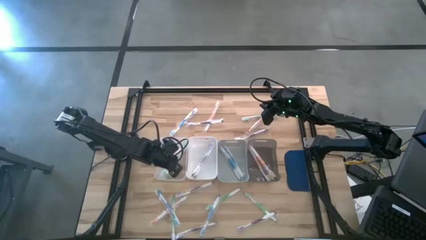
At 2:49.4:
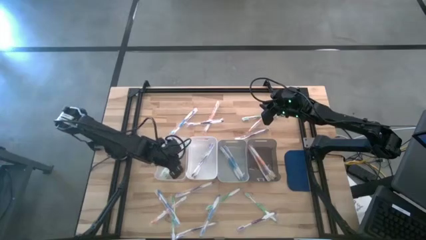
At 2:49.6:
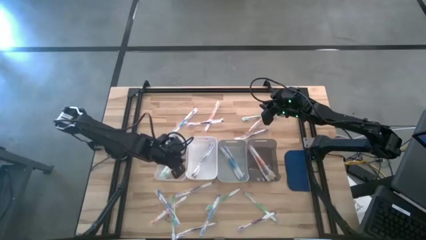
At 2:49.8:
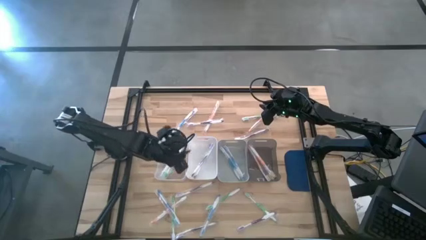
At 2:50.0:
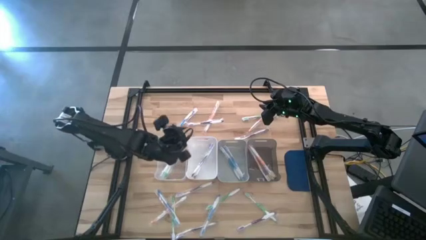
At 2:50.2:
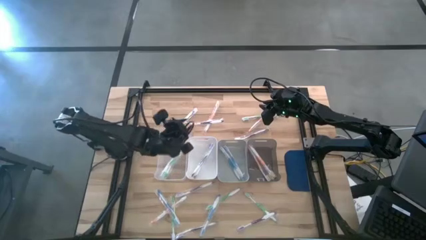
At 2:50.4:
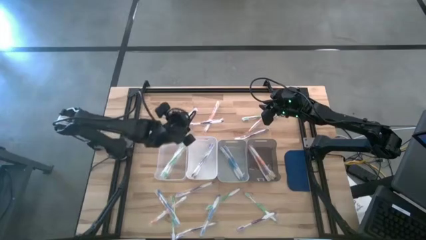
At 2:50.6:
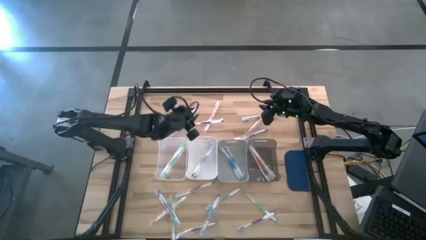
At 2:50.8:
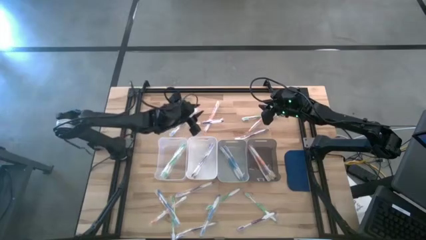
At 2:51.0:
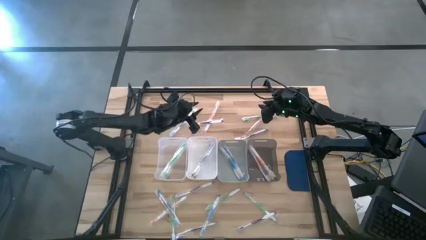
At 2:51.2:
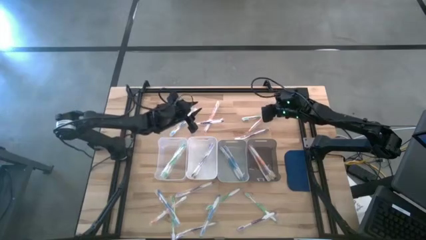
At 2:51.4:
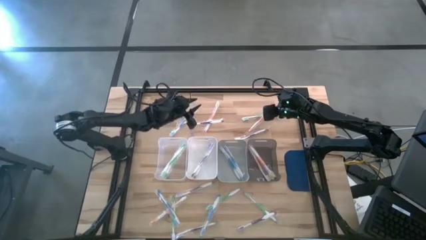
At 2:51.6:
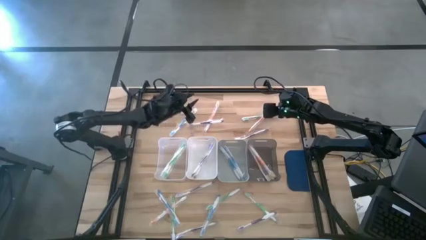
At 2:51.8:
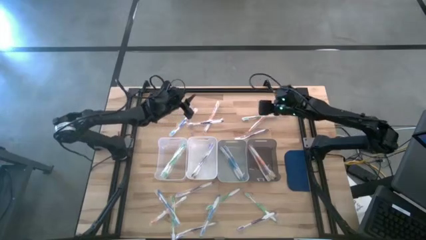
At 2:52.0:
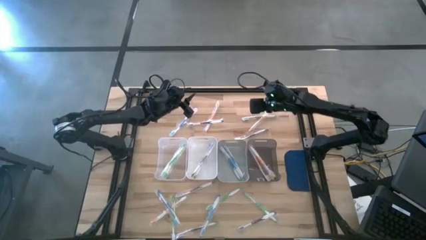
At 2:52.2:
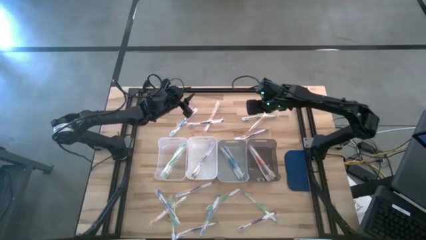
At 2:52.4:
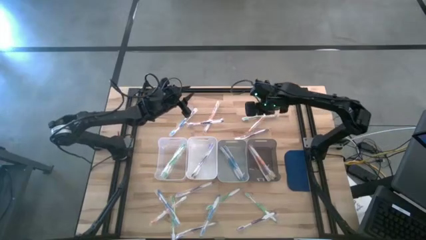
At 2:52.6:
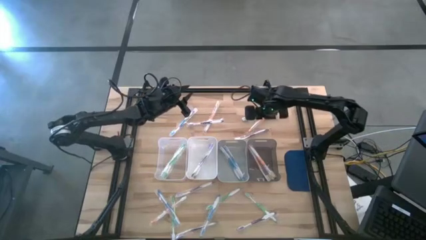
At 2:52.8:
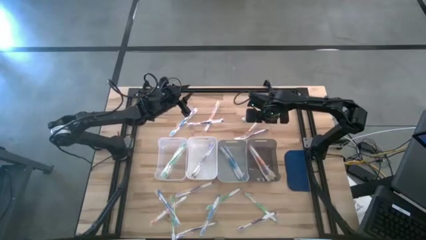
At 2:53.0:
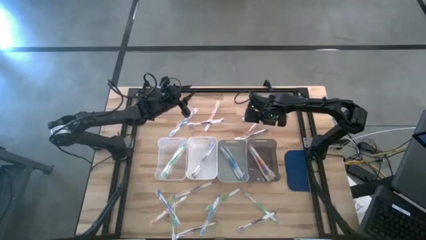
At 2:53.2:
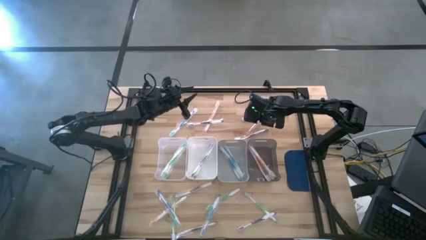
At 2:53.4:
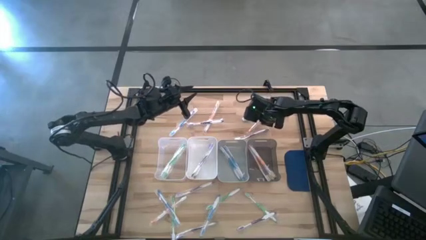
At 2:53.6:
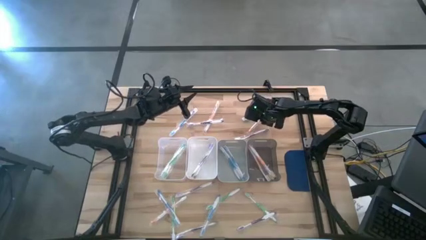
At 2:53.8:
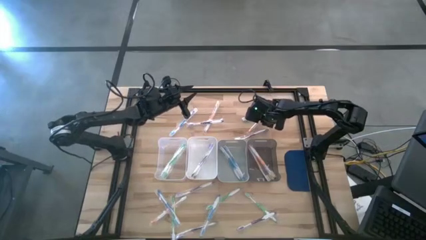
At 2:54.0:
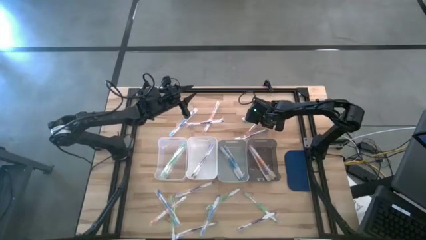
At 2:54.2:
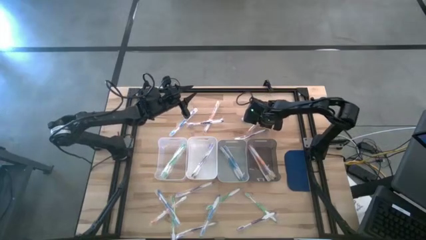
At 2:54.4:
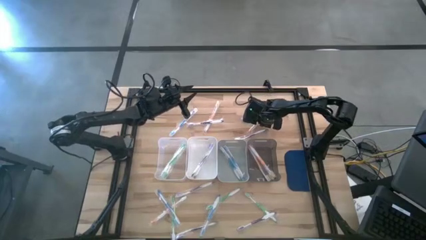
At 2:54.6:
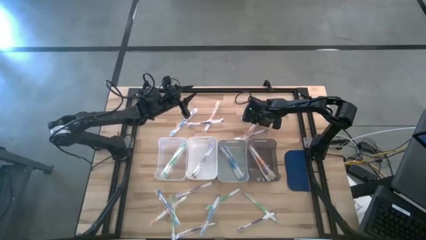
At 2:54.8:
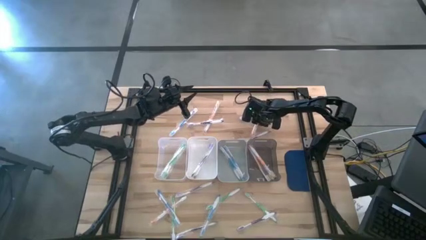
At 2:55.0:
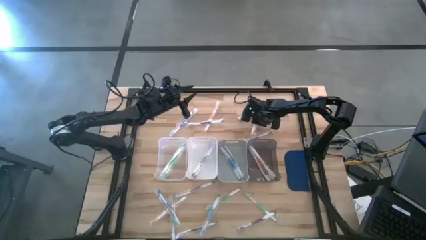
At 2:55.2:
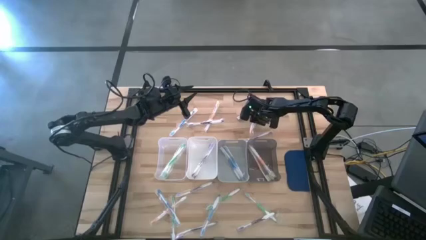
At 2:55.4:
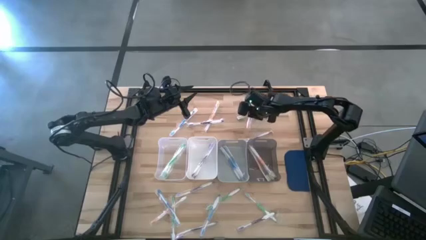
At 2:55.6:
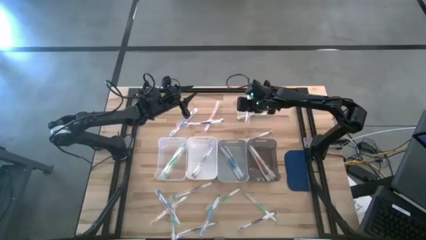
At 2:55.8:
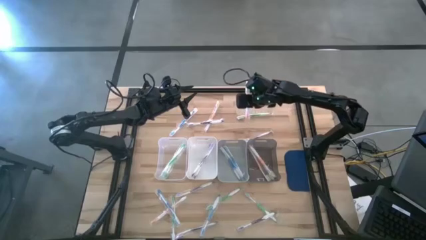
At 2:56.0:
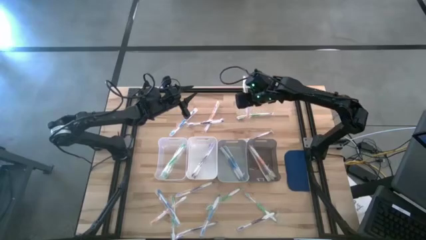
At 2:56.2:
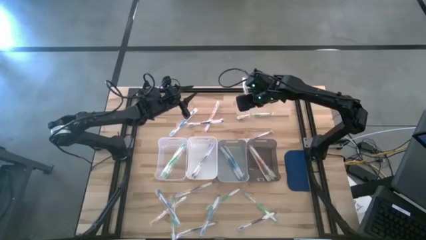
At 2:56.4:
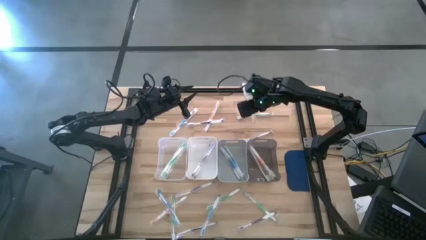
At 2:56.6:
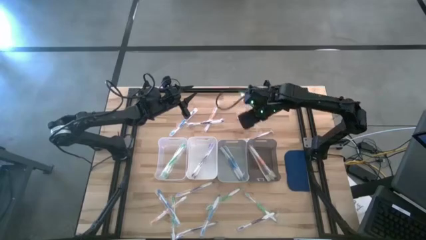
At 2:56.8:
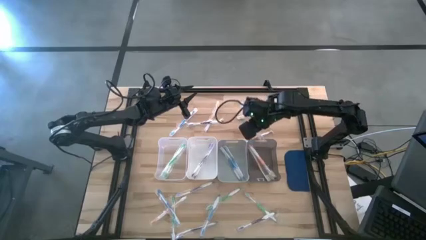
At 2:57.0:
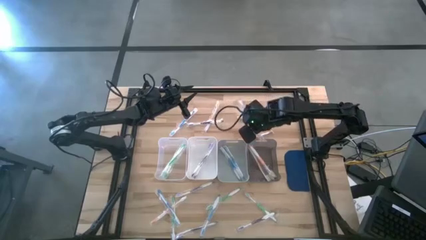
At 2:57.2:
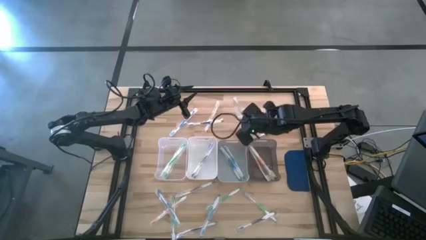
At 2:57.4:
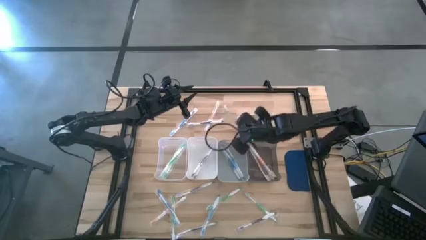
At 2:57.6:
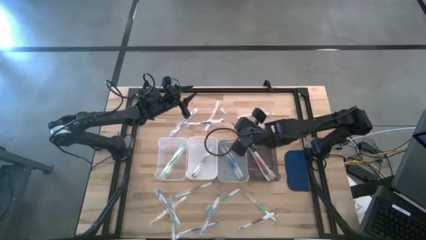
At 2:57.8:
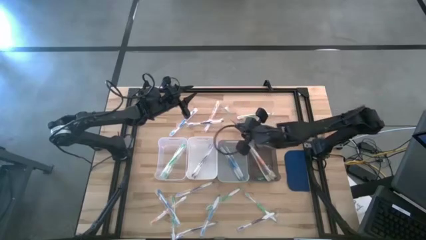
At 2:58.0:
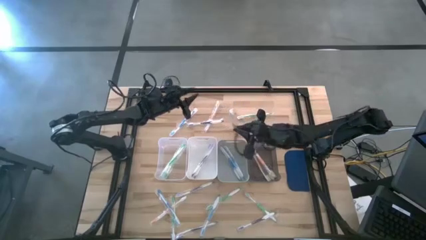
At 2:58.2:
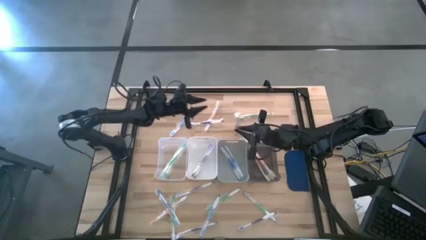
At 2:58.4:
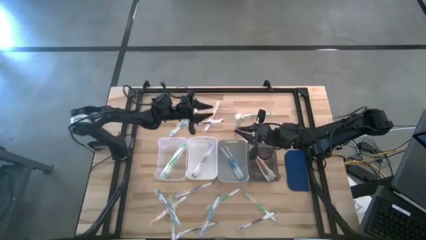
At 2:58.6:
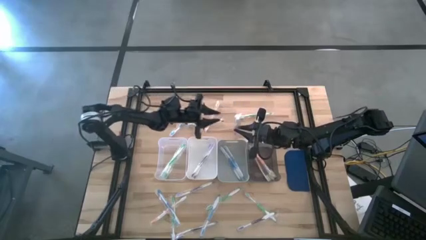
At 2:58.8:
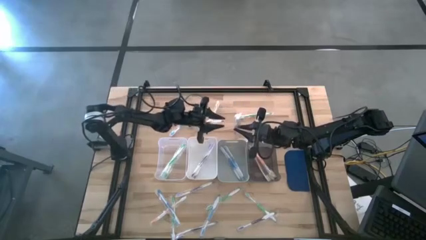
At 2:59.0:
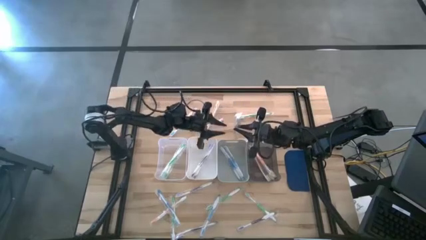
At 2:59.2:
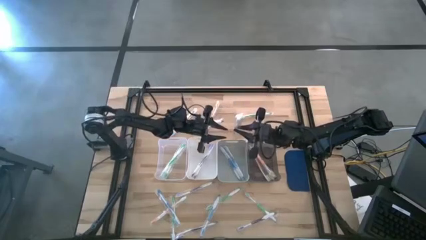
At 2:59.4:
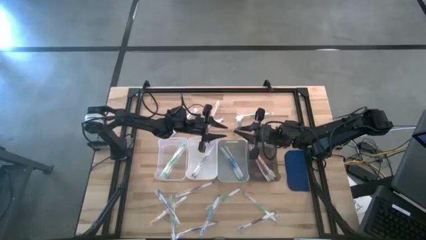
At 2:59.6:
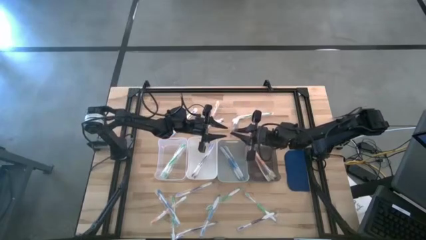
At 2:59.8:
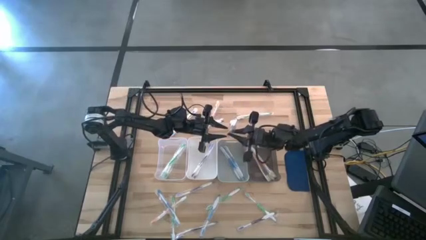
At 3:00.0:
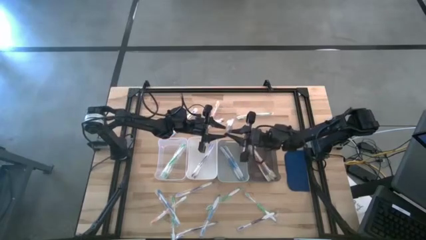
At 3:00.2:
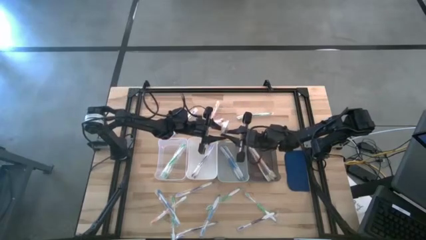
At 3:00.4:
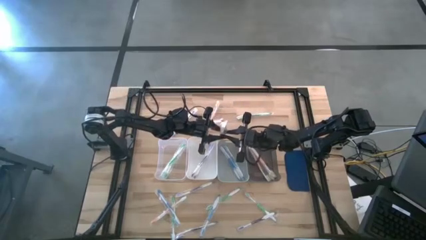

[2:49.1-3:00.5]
Task: Pick & Place Toothbrushes
Put the orange toothbrush into the black bin
